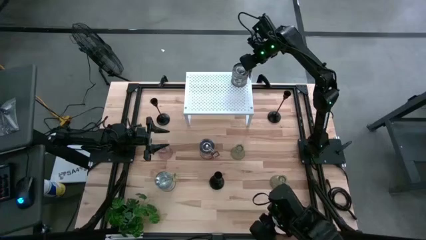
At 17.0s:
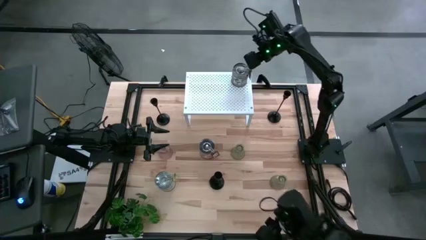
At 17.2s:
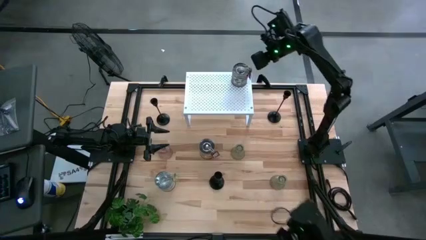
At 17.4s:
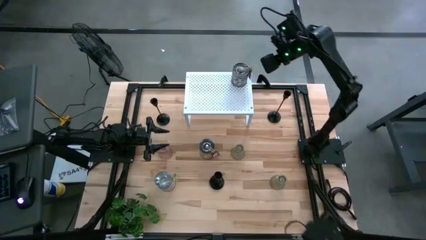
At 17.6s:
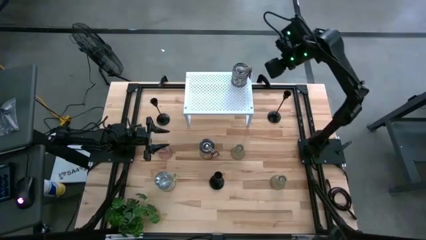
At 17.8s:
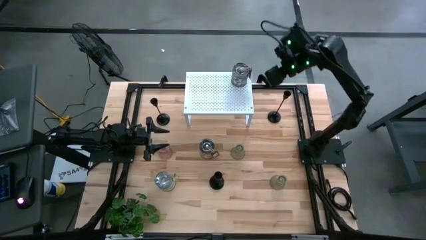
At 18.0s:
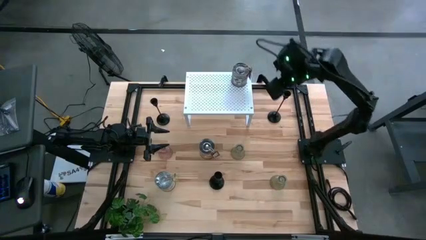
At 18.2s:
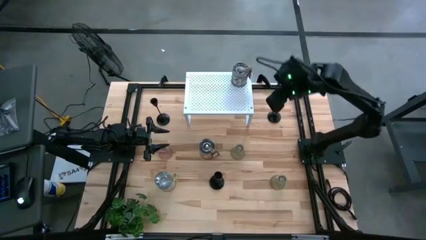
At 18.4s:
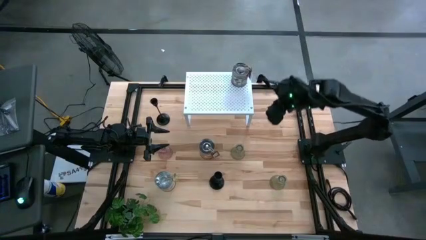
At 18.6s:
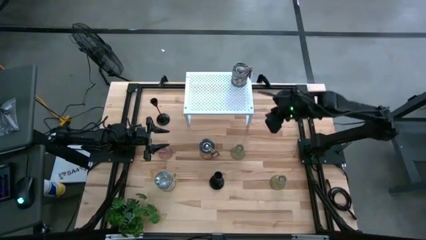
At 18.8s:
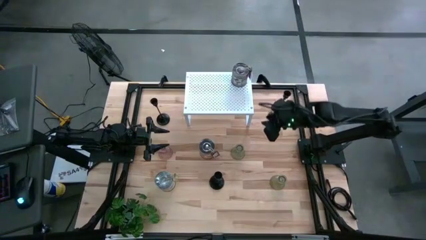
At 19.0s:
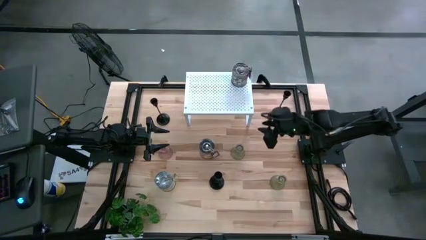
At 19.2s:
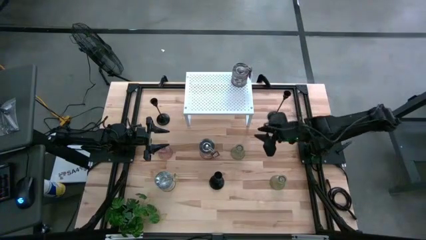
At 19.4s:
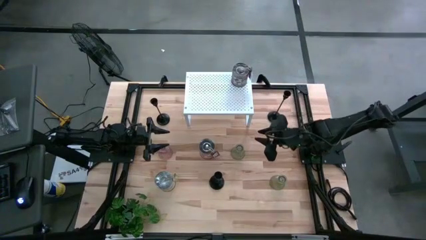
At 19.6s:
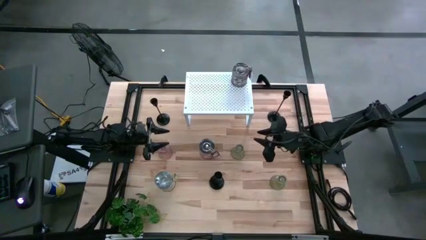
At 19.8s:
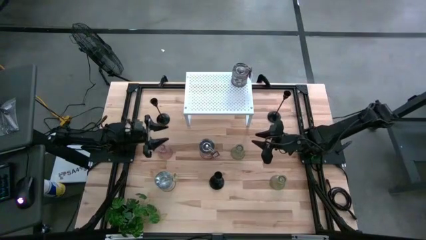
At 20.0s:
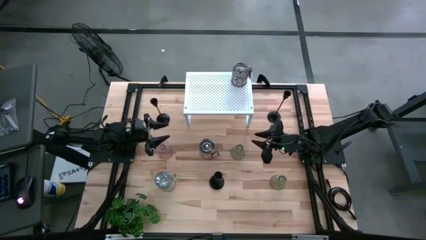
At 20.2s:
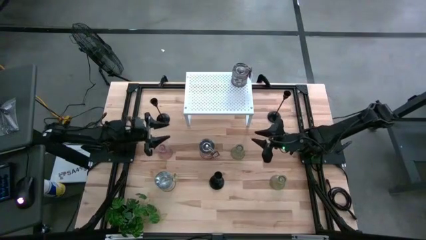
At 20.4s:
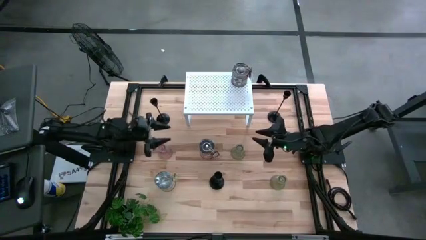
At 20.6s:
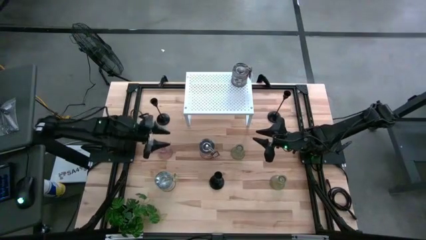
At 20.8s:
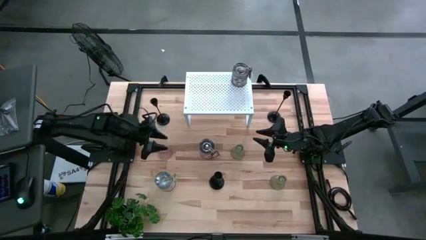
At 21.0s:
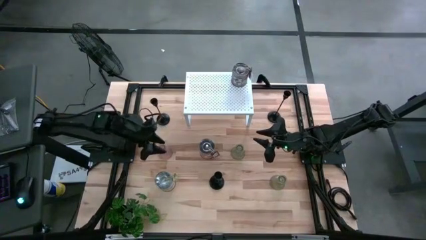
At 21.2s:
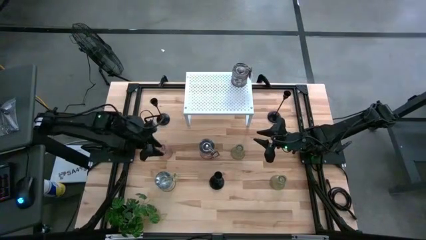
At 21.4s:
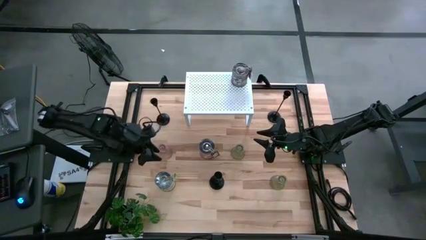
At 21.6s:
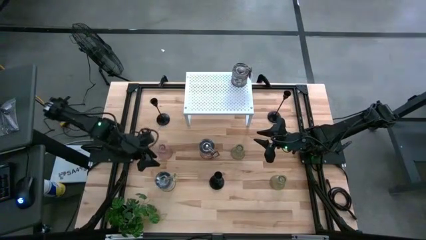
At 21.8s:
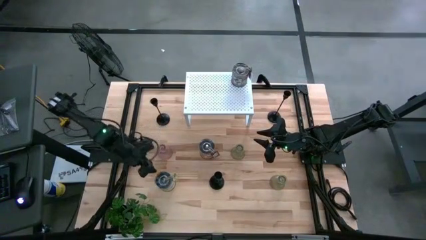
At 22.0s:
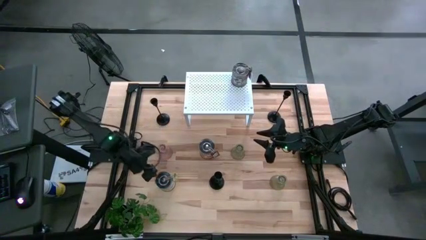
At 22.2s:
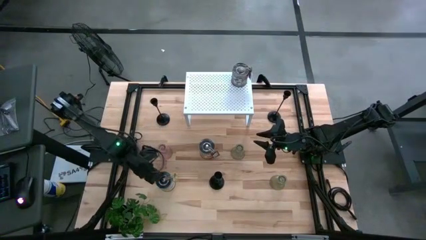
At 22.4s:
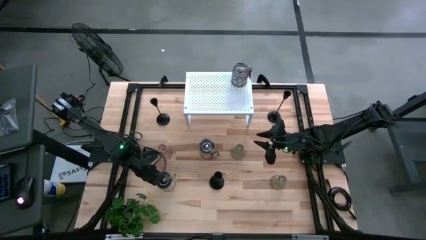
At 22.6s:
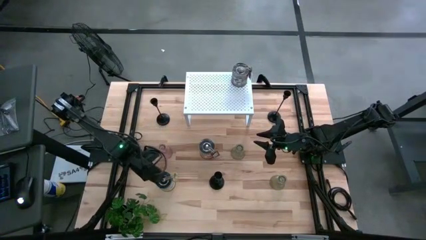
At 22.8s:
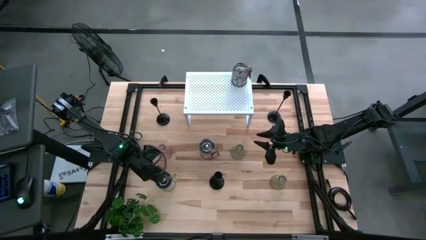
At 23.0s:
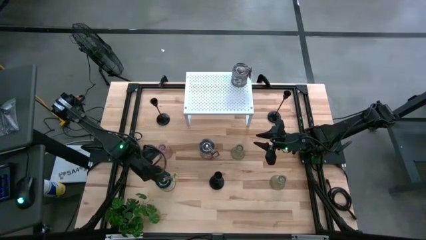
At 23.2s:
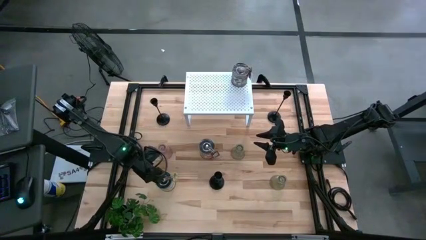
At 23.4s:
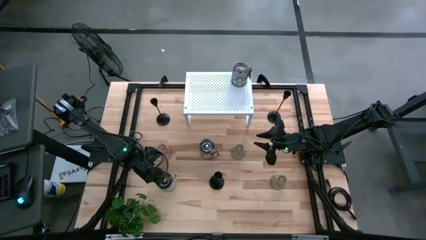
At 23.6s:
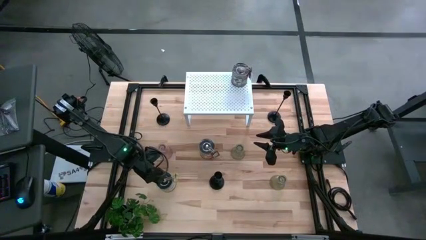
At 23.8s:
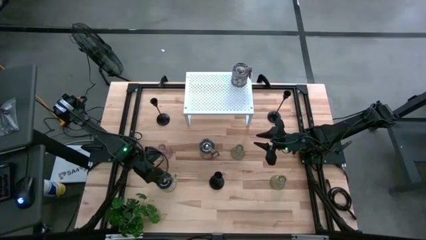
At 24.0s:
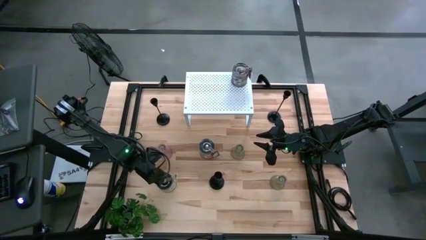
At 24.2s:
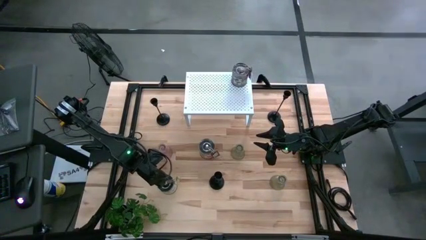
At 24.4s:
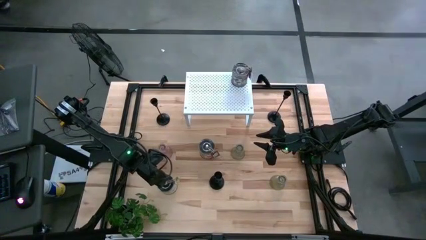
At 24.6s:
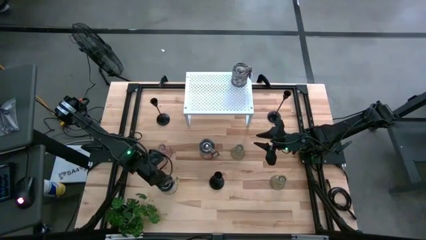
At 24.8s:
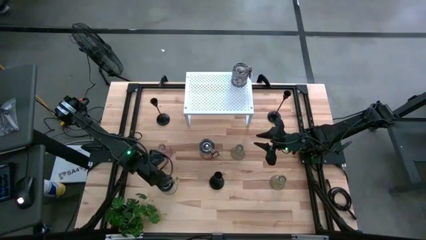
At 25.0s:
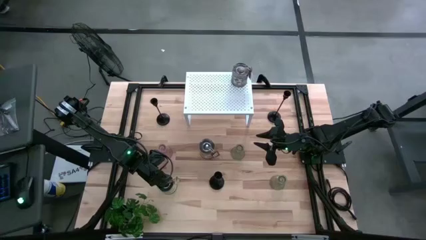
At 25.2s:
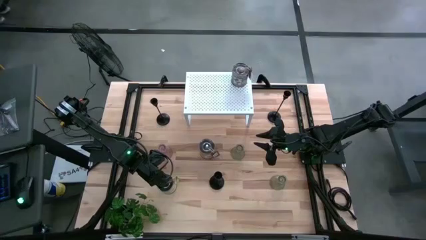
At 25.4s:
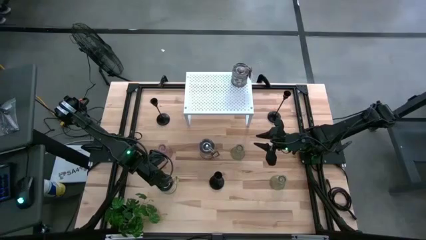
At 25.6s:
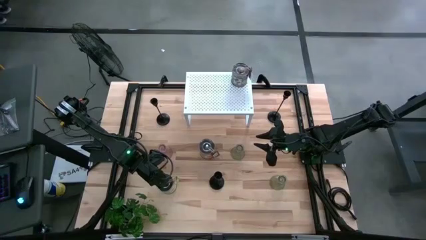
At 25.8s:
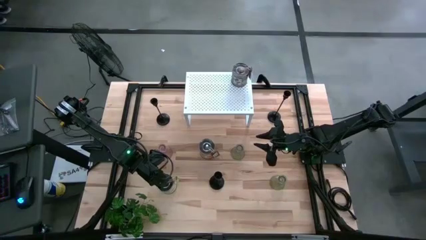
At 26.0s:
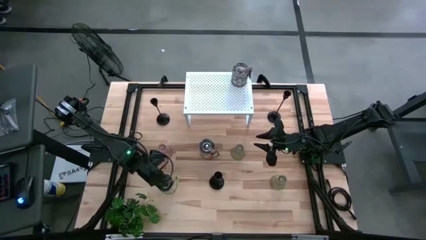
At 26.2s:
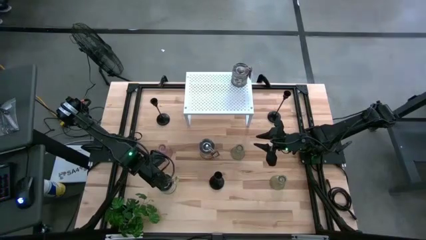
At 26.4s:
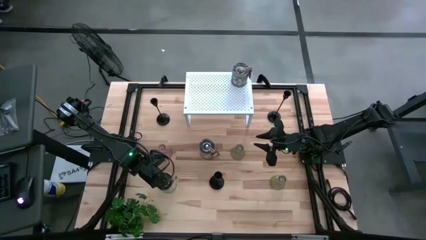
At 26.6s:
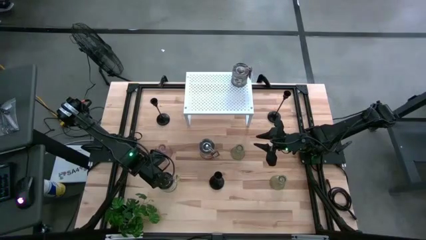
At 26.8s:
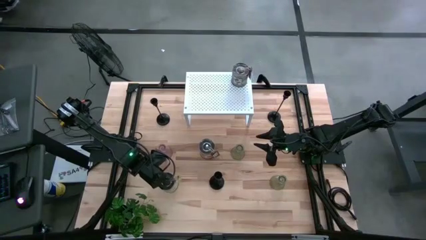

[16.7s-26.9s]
Task: Pick & Place candle stick holders
Align the left scented candle on the shelf with the other scented candle

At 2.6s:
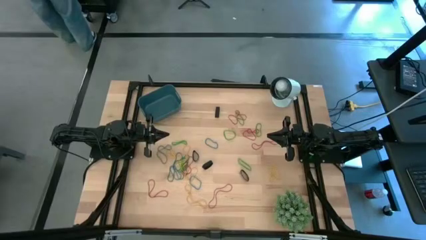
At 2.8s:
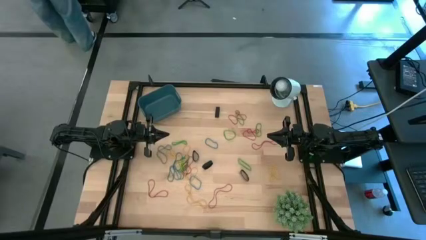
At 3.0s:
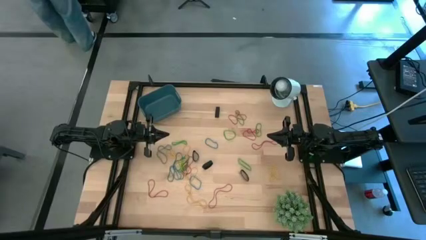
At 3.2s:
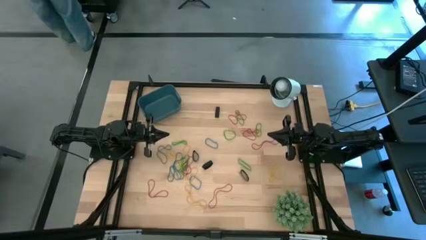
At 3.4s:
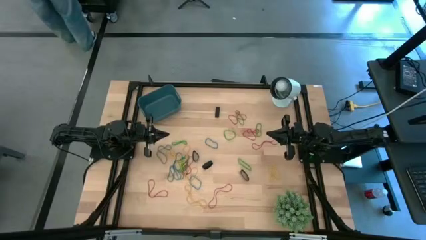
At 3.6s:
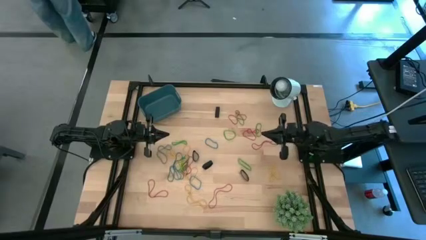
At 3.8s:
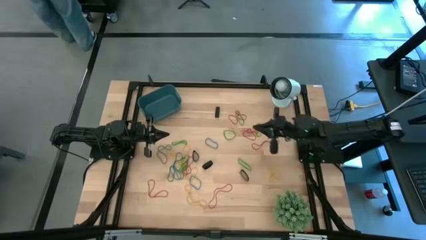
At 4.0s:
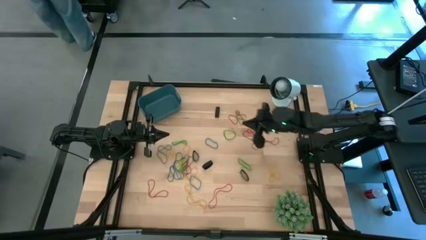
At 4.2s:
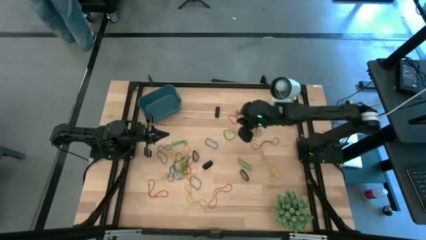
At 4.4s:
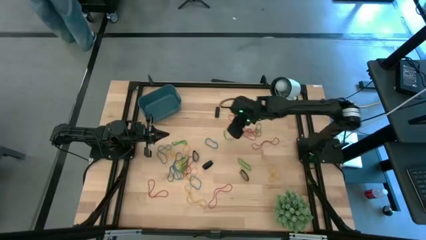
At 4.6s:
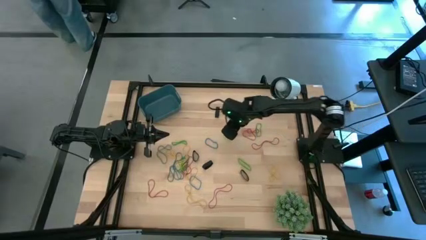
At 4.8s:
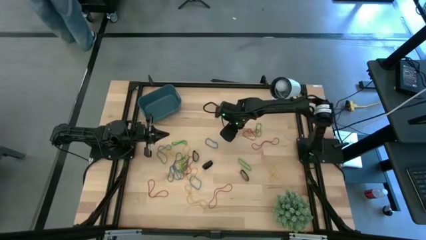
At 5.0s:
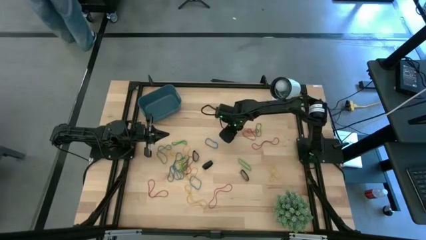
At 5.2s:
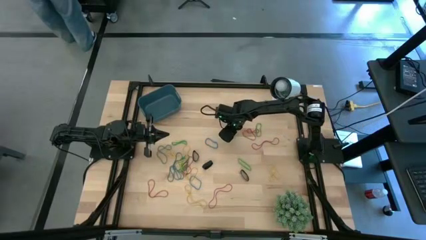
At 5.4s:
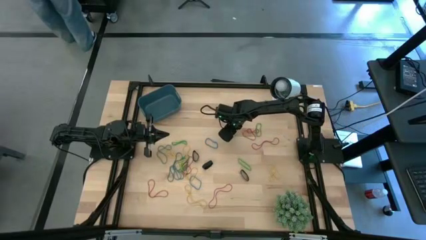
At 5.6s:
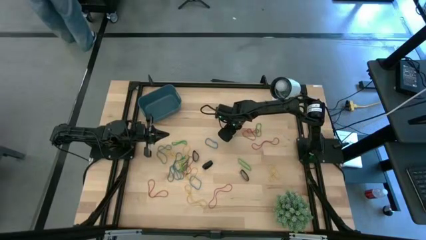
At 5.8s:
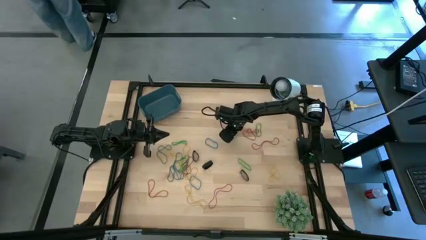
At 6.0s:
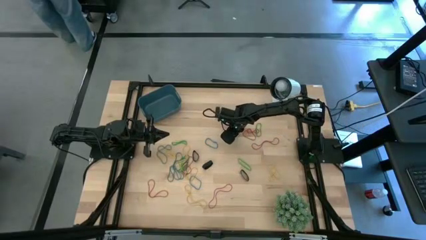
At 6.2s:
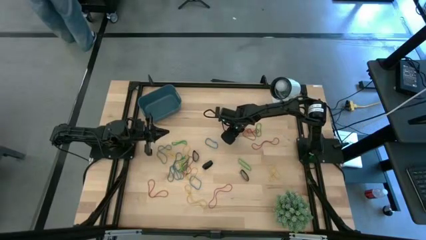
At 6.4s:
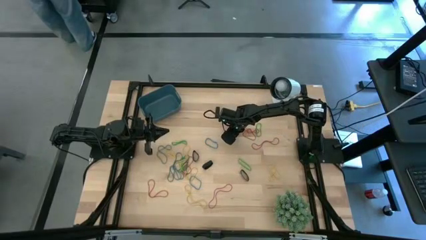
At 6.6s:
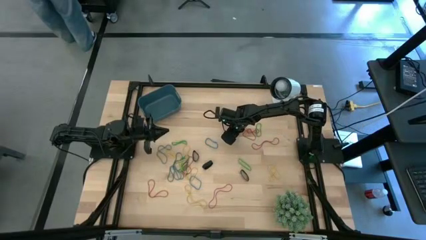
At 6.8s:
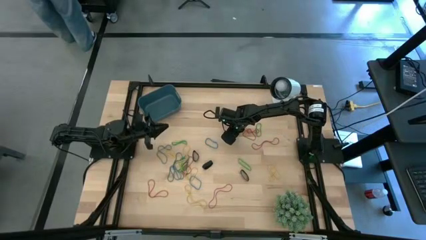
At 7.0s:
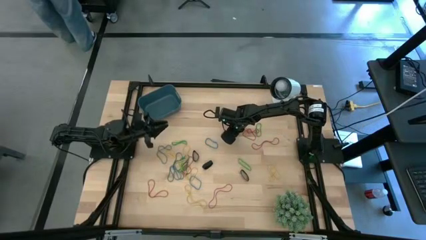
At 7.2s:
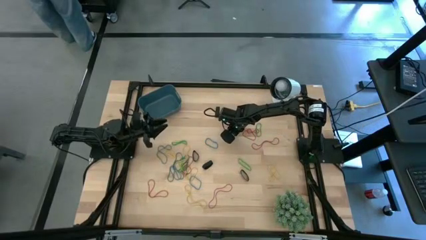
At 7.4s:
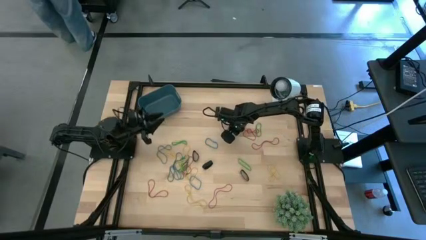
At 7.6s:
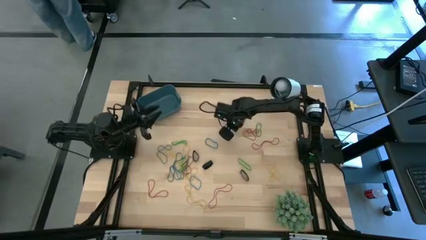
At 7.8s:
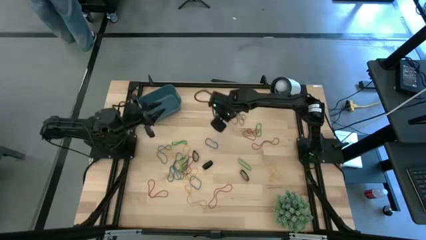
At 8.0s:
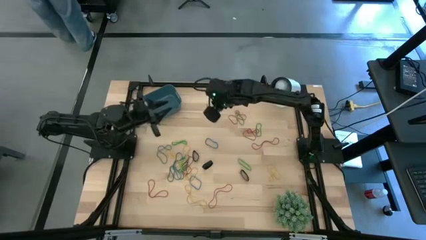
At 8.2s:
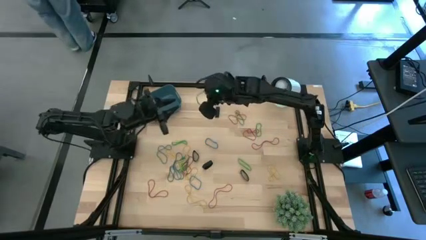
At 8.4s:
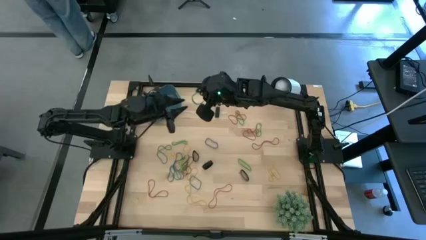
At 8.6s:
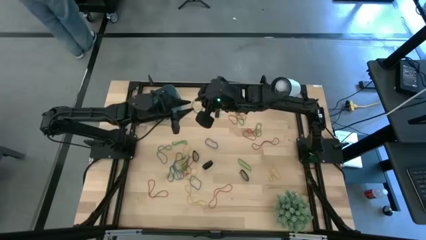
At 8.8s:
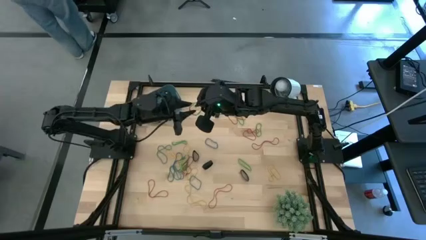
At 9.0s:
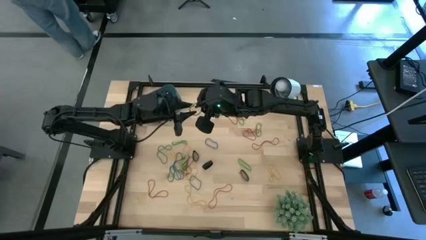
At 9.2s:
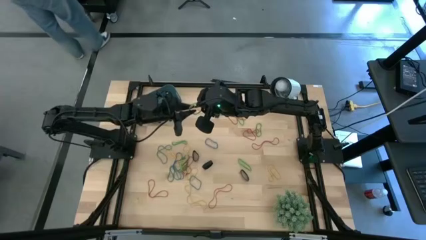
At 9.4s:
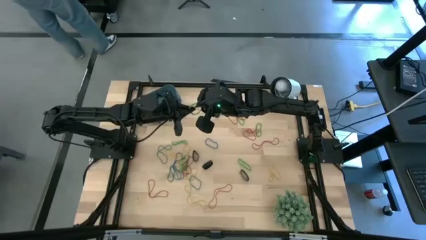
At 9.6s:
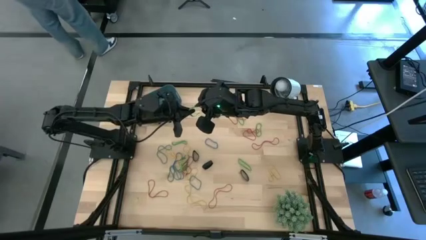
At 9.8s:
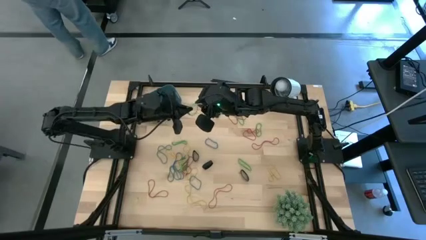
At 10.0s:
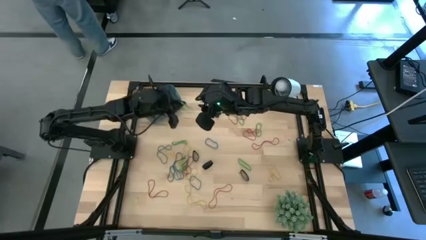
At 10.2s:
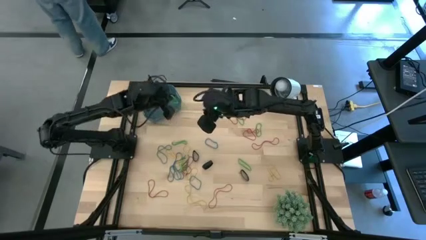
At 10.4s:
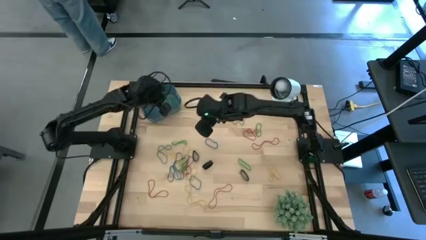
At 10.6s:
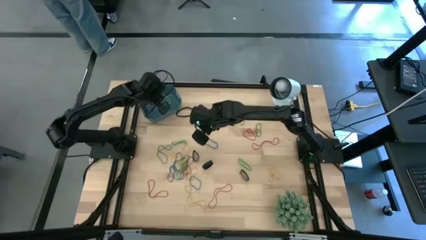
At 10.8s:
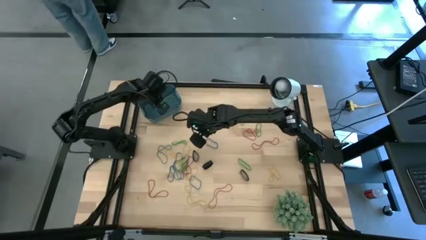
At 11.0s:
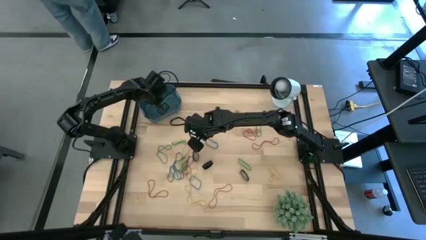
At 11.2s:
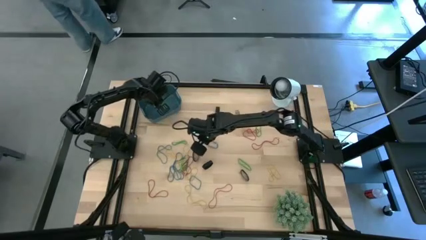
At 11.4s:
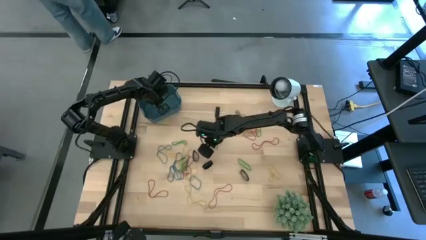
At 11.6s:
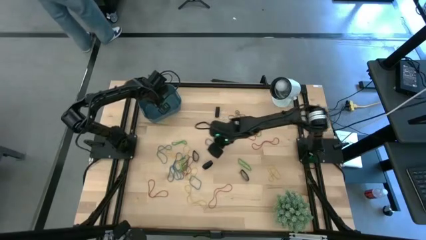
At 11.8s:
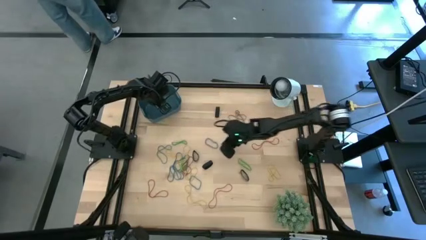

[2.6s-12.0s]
Task: Pick and place rubber bands into bin
Put the green rubber band into the bin
